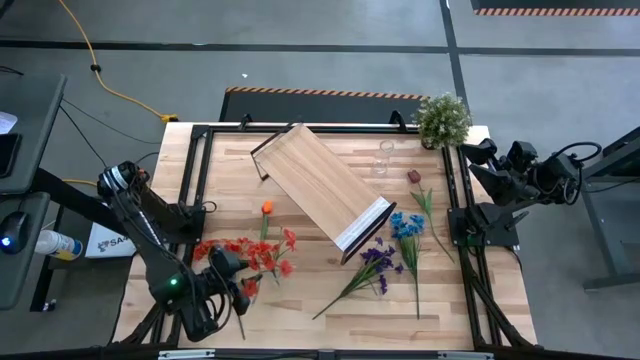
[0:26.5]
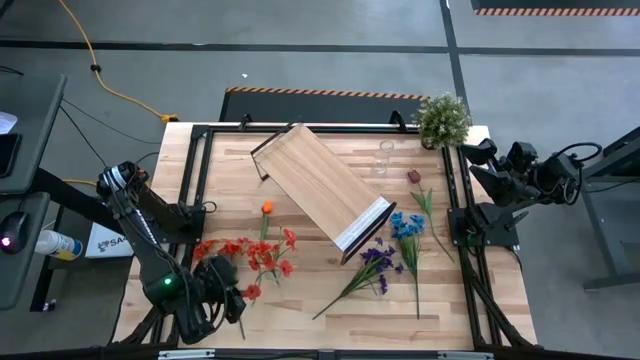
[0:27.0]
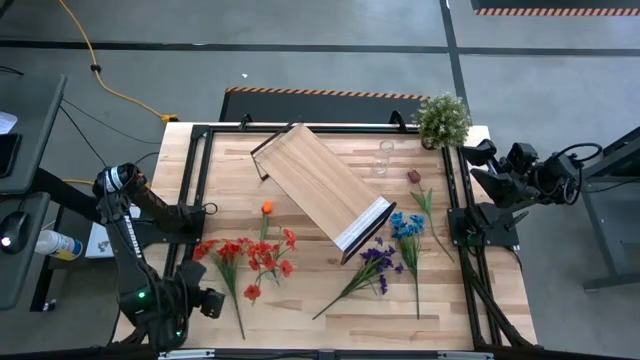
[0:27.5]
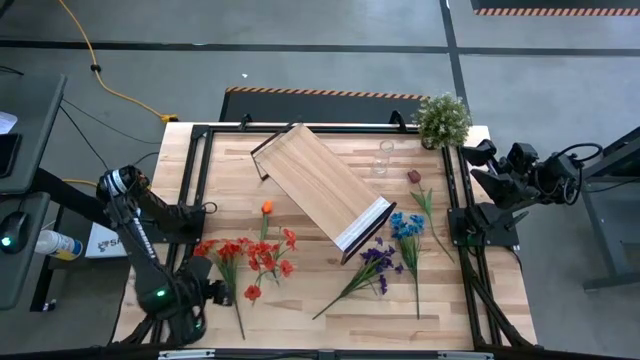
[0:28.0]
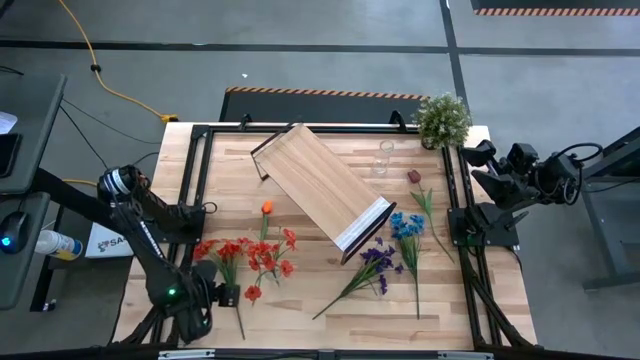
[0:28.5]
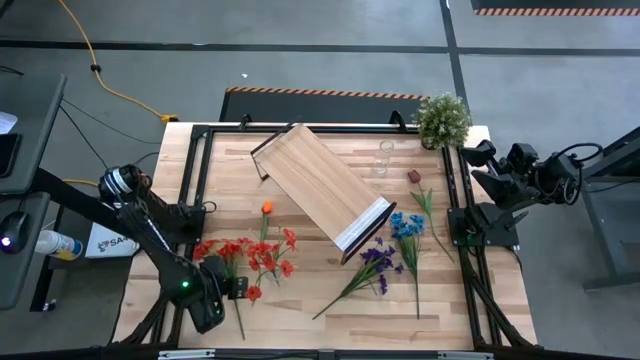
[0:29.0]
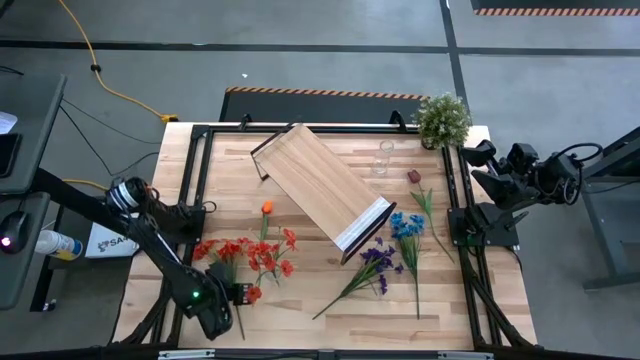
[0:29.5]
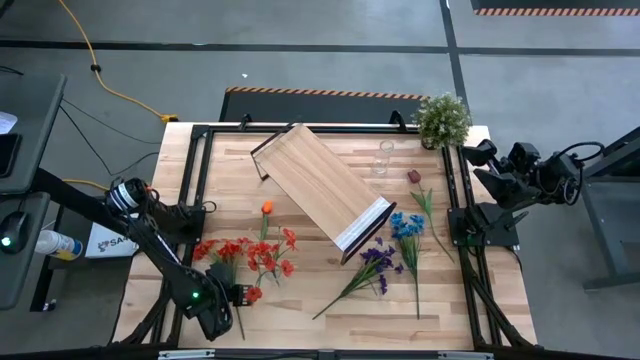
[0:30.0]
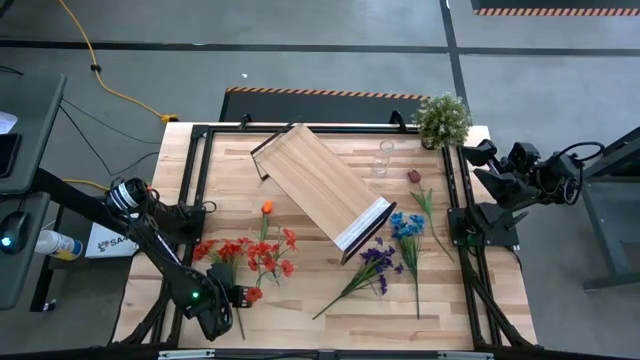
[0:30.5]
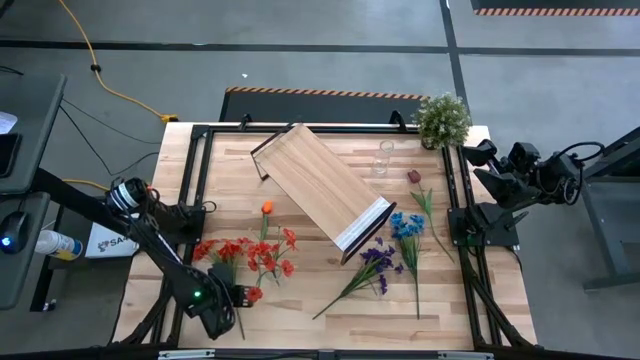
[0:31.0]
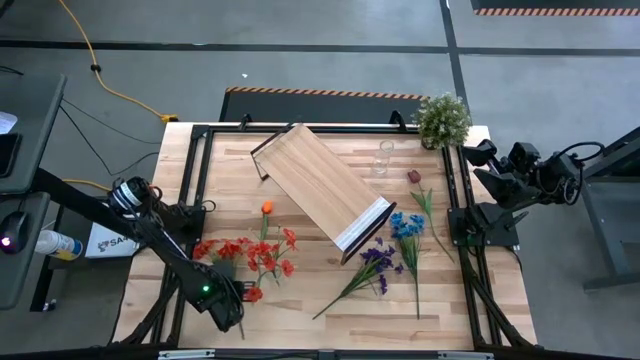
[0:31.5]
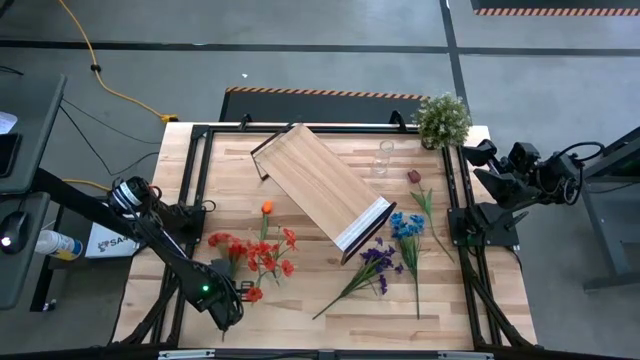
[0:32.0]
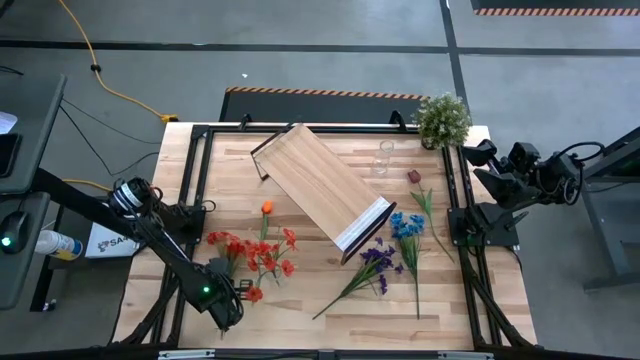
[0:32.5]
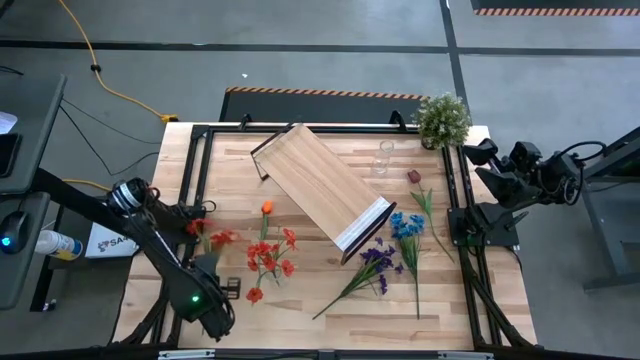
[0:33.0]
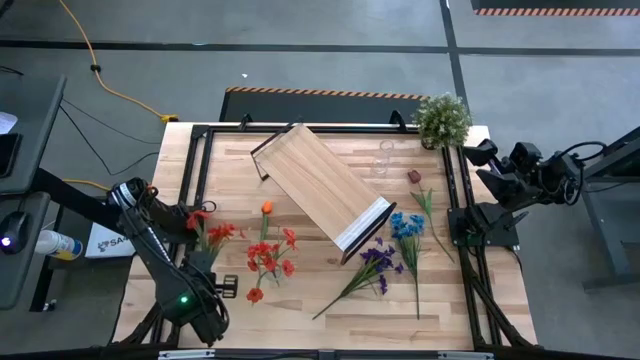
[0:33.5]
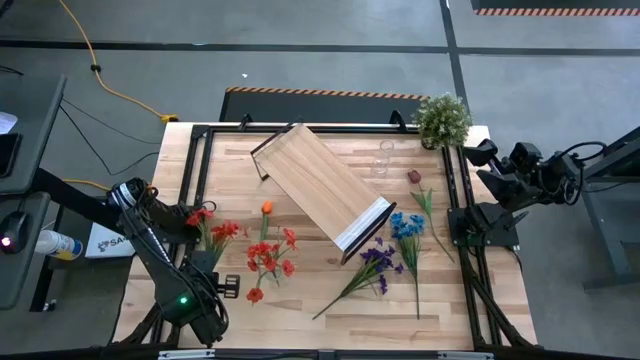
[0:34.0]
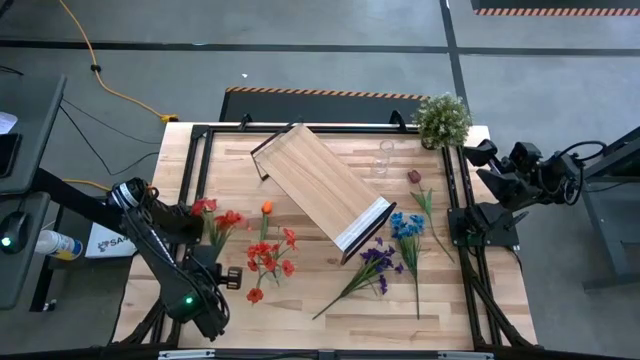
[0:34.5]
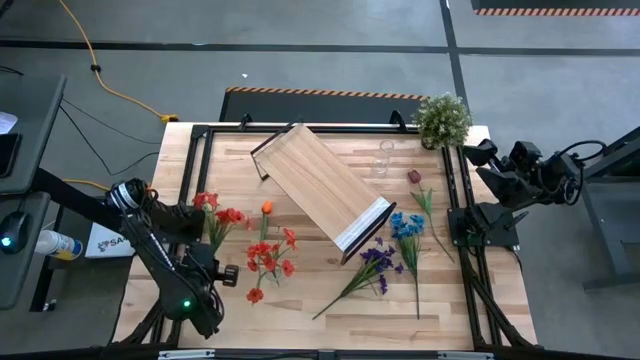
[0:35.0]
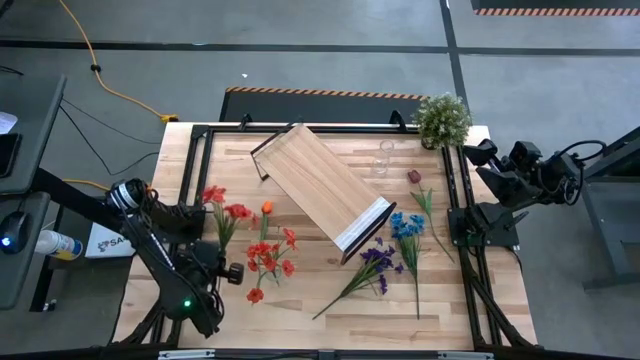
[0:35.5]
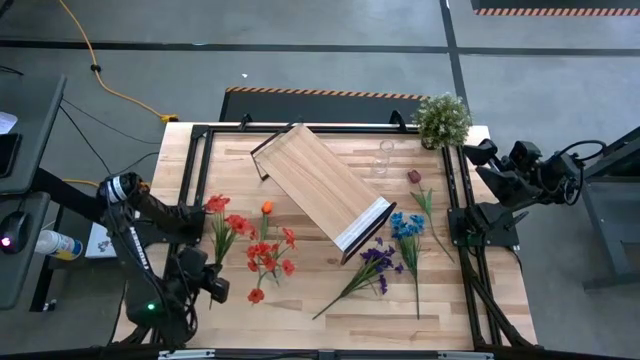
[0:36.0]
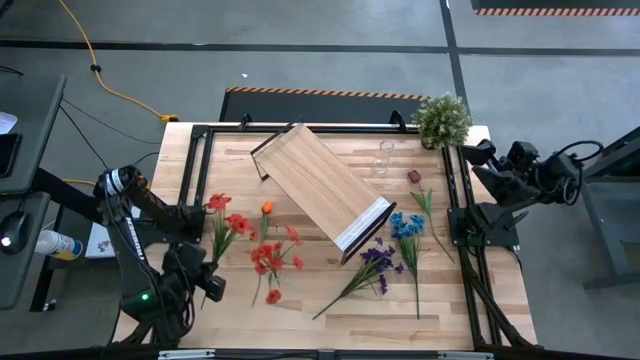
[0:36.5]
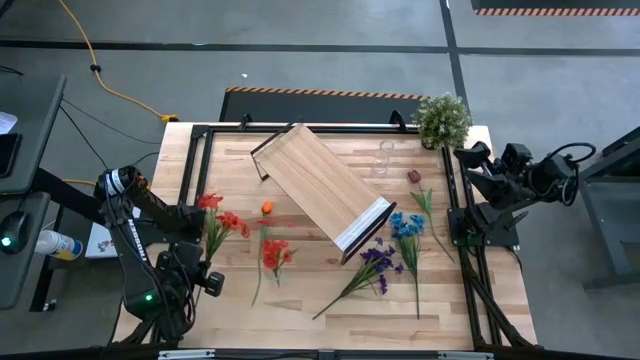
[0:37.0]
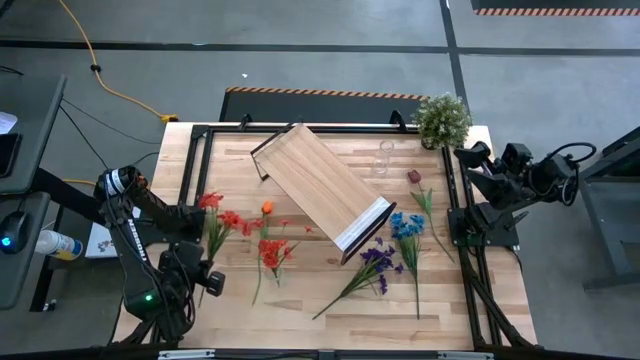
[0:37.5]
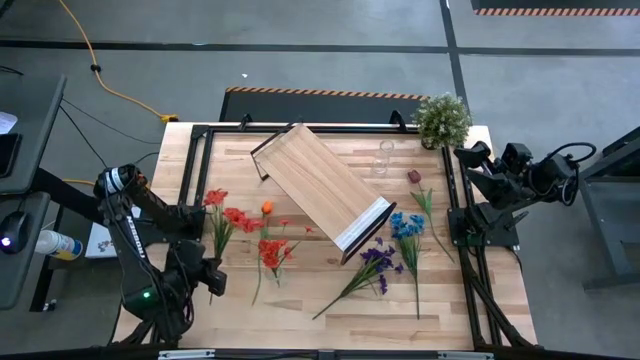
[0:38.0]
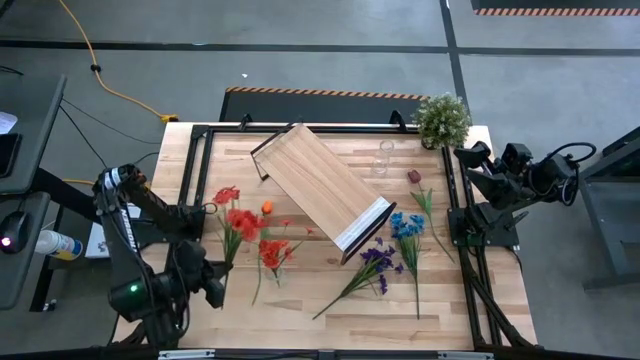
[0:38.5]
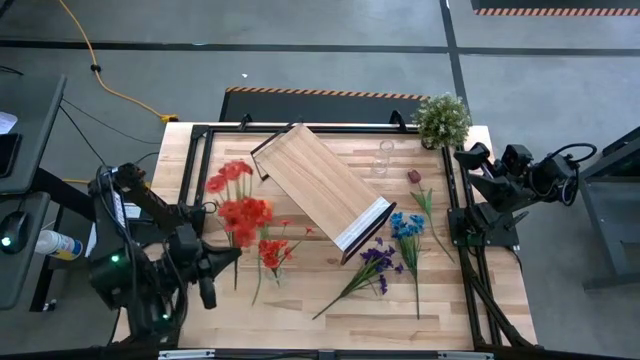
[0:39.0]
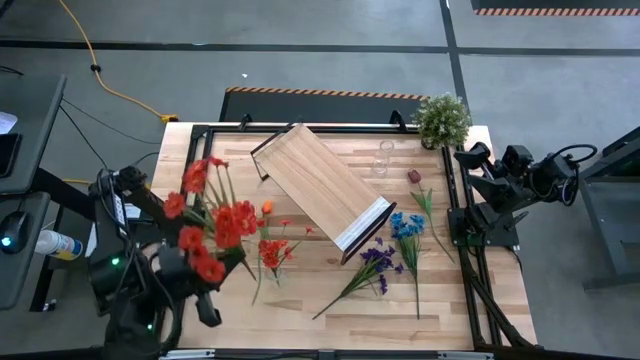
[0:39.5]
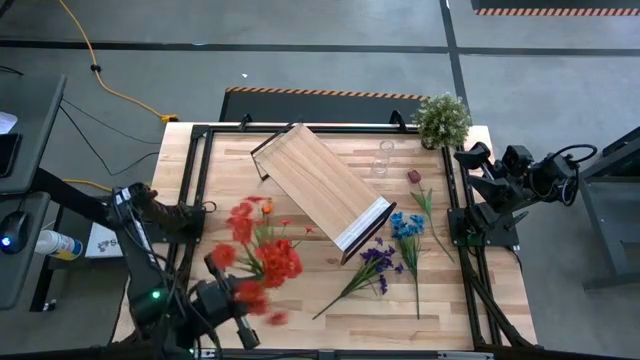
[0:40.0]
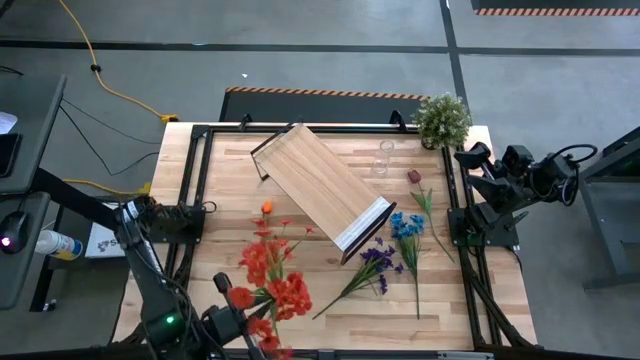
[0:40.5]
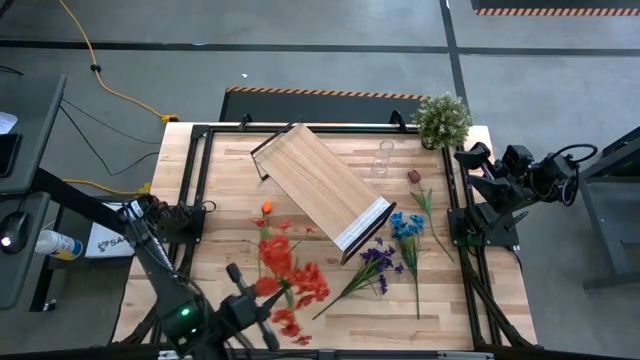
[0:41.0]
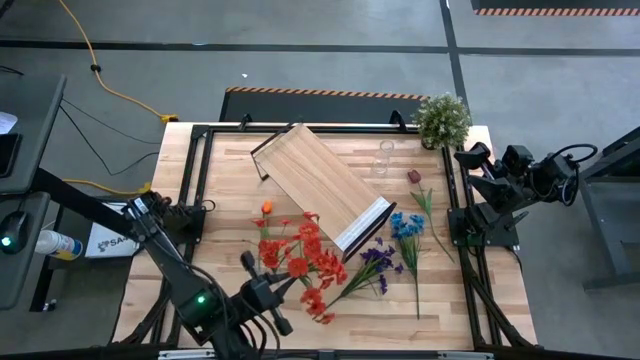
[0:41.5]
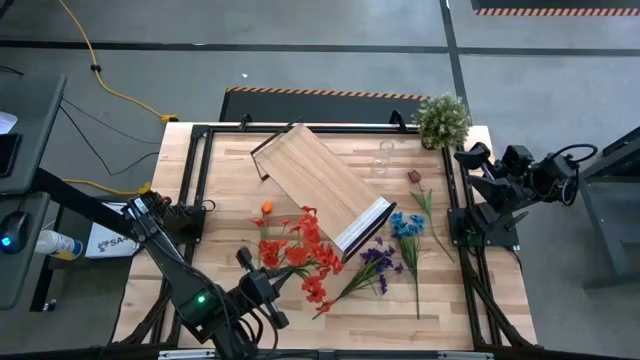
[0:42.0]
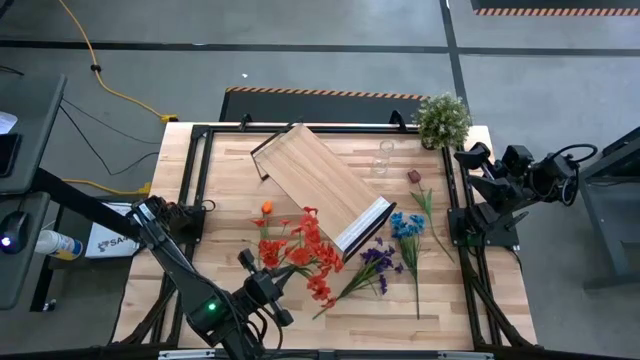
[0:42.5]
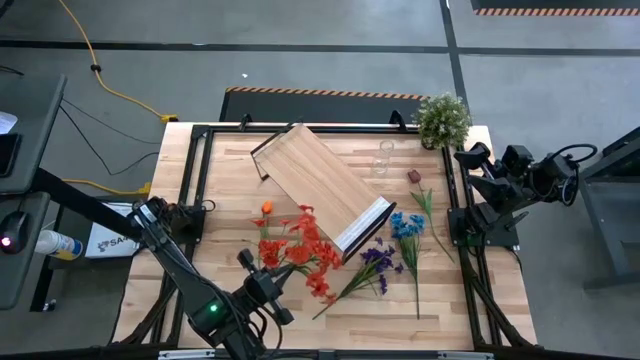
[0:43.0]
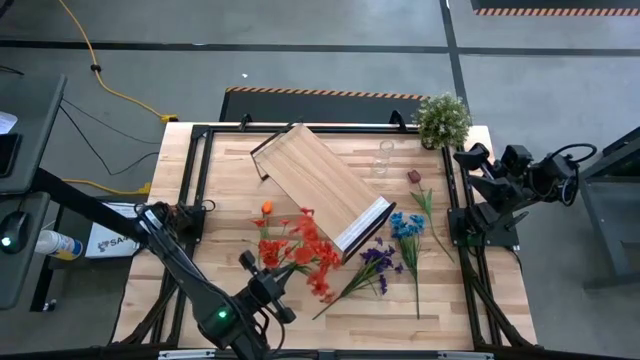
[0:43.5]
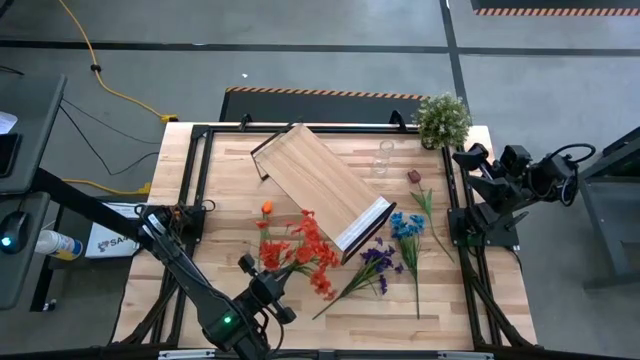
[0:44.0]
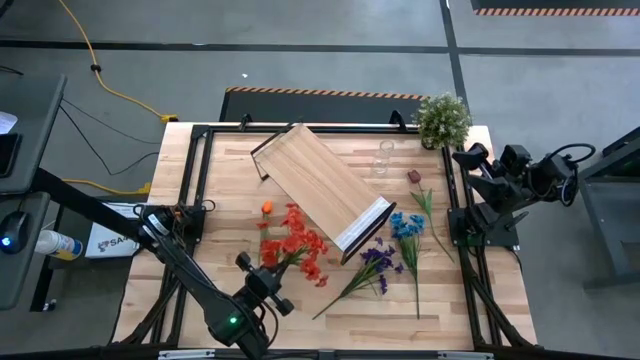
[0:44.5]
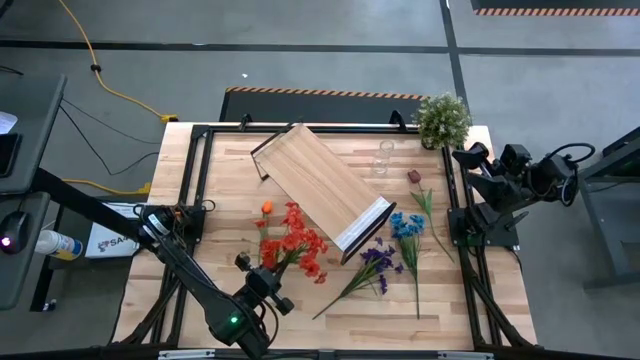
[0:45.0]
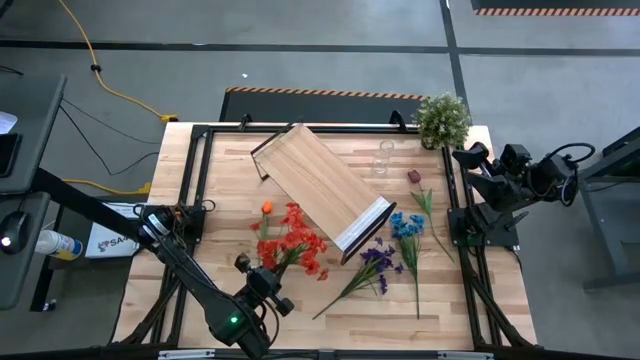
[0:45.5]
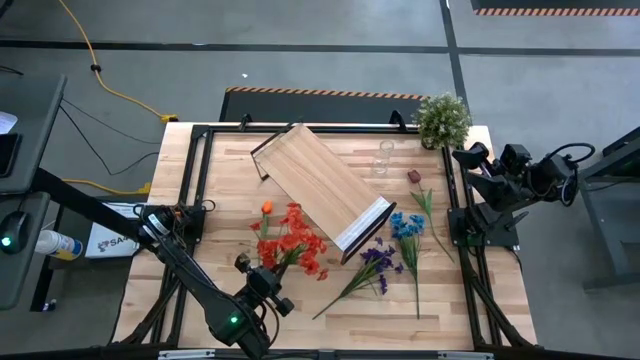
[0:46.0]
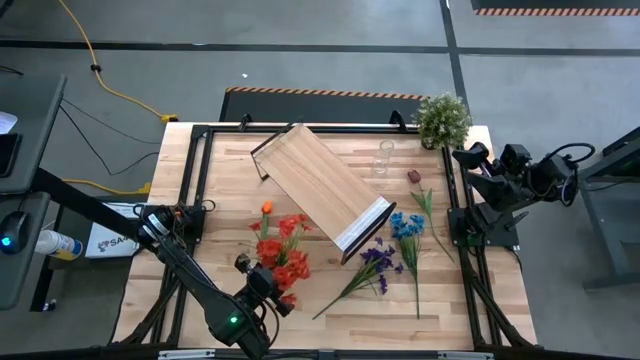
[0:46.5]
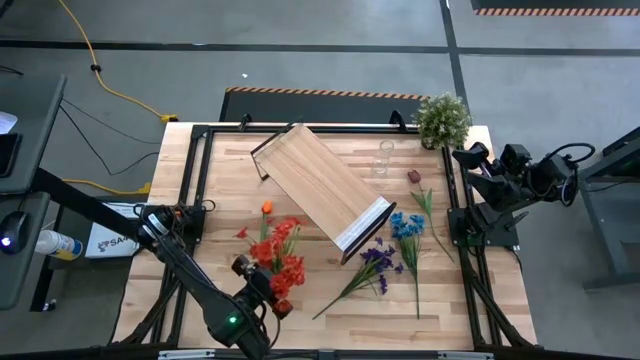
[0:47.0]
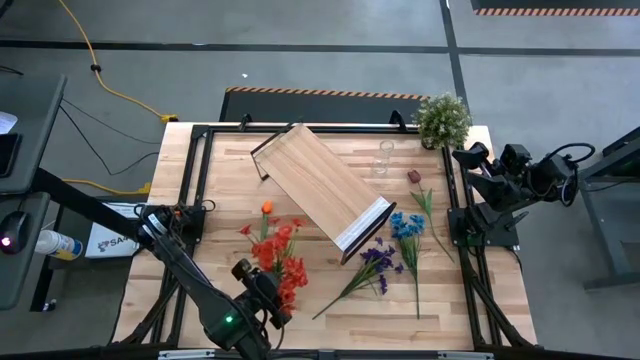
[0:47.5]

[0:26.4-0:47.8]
Task: Pick and place flowers into a vace then onto a shelf
Put the orange flowers into the bottom transparent vase
